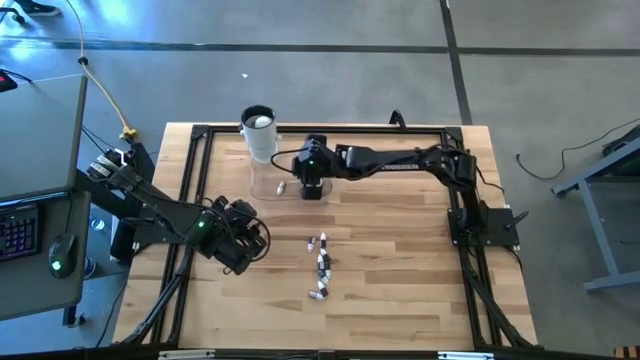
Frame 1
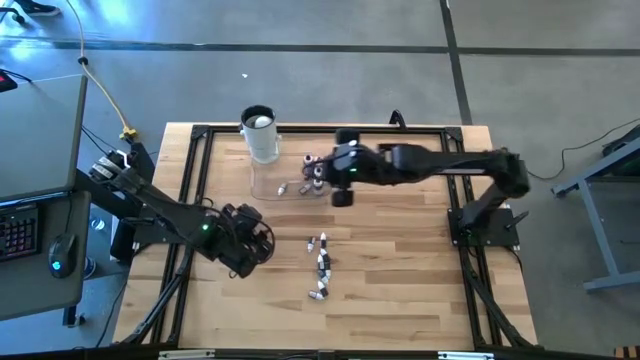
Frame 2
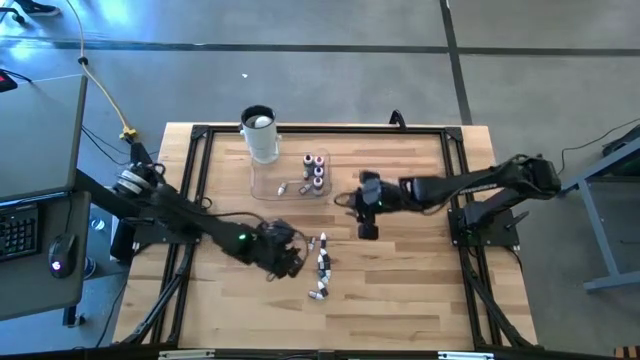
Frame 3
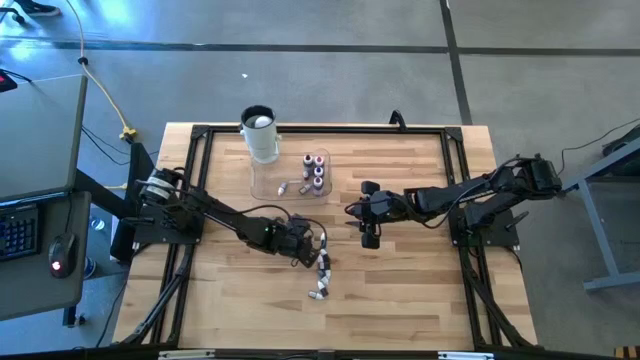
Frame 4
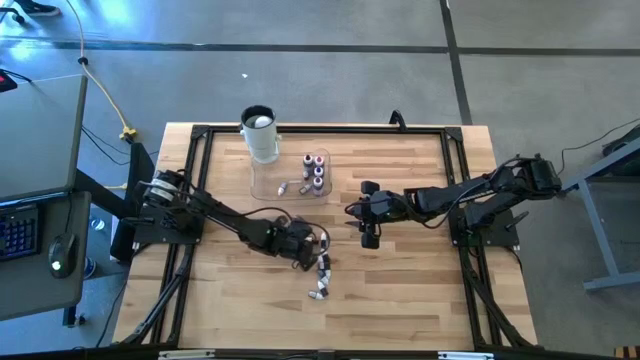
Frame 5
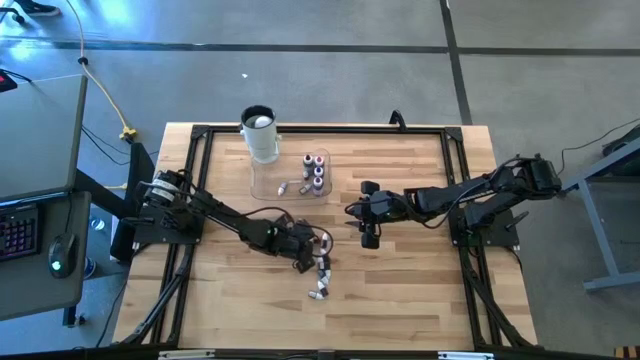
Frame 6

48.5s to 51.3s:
Task: Pick & Place food coloring
Put the small red food coloring bottle into the transparent bin

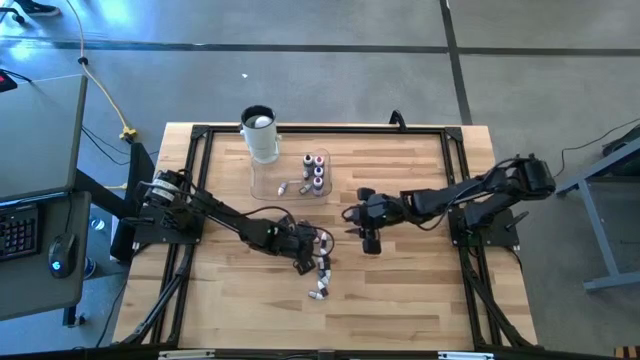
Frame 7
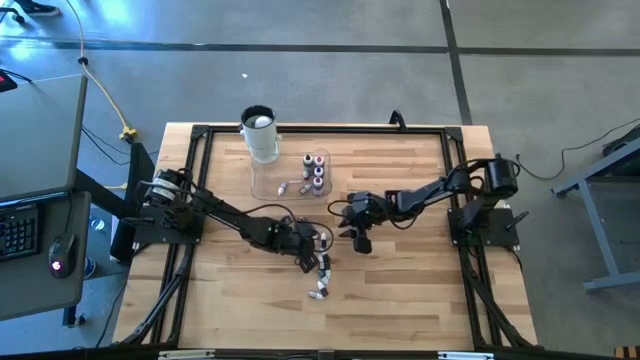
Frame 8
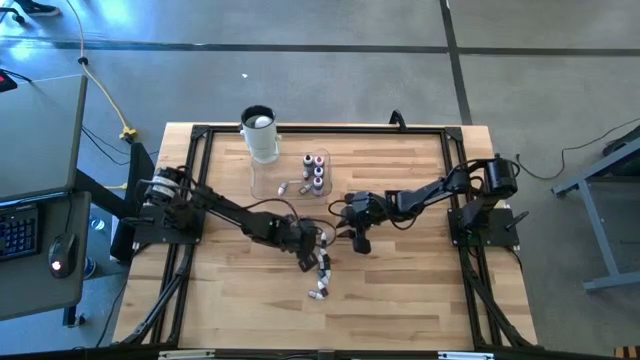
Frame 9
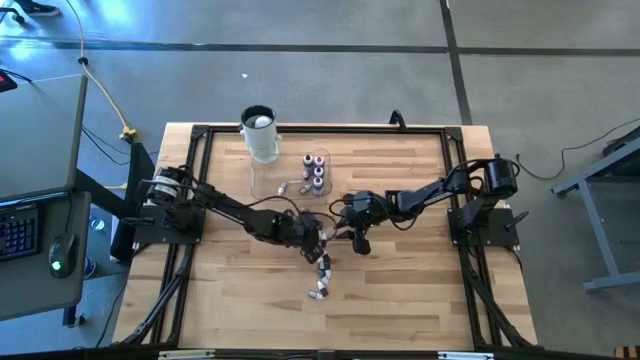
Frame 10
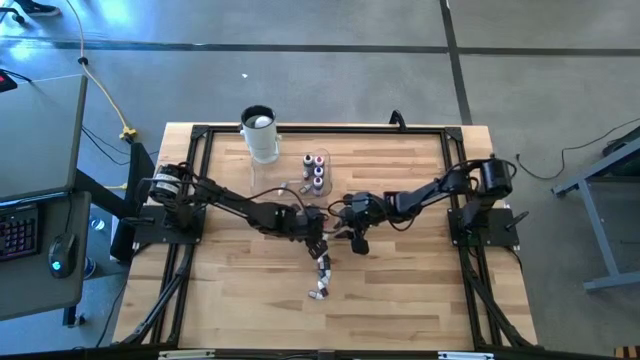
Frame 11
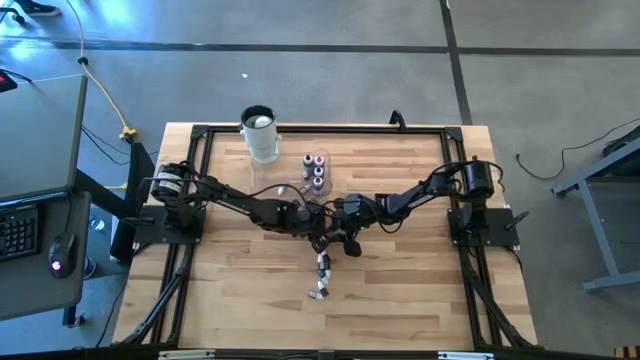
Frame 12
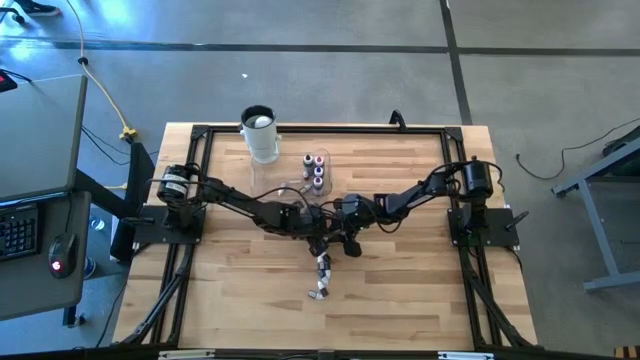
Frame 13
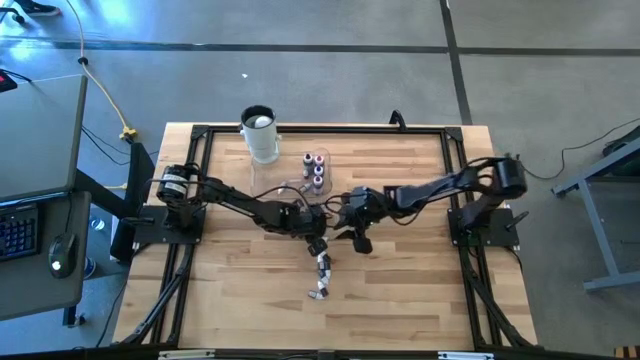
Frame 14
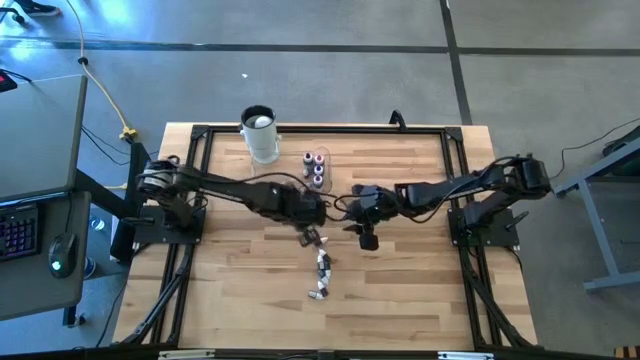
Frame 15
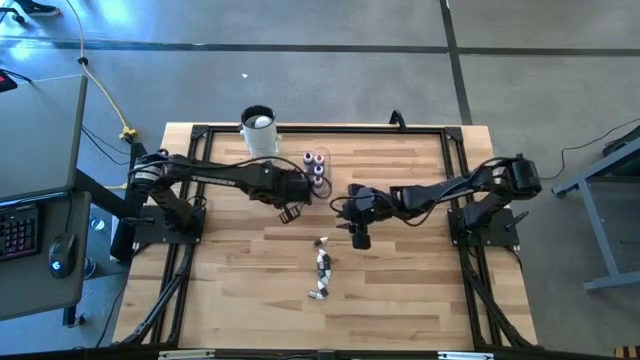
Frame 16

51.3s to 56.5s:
Put the small red food coloring bottle into the transparent bin

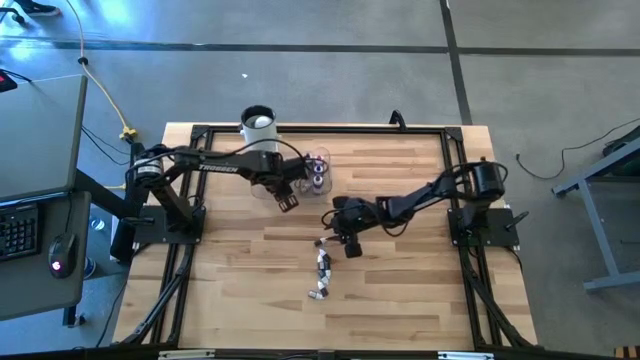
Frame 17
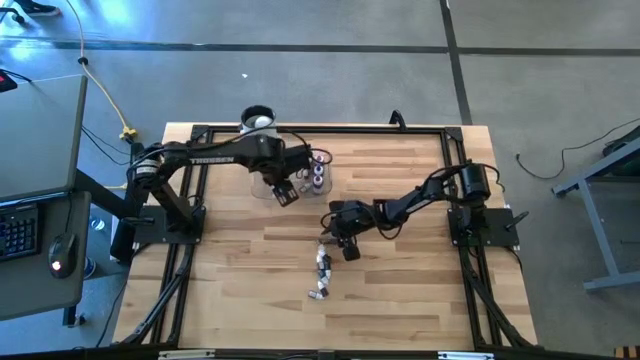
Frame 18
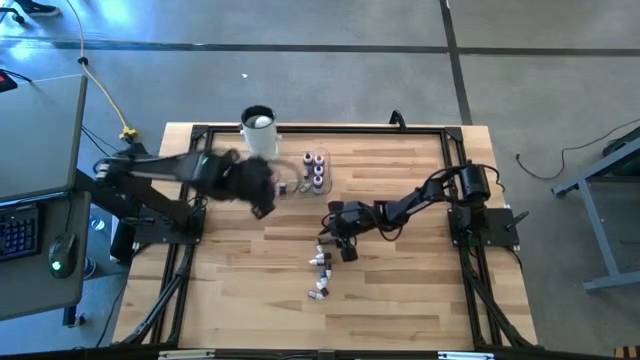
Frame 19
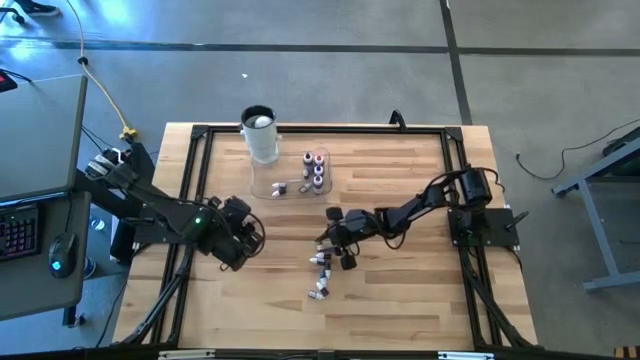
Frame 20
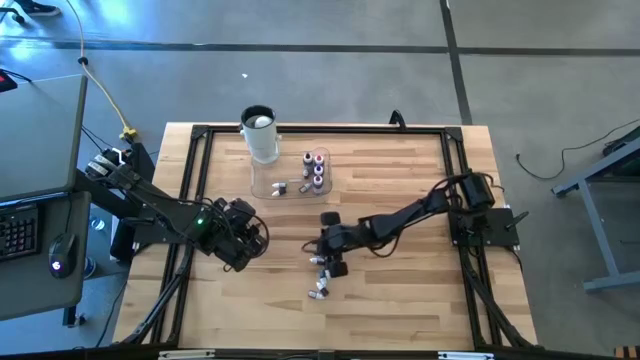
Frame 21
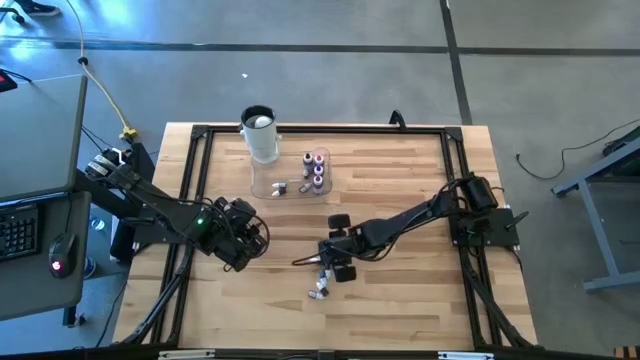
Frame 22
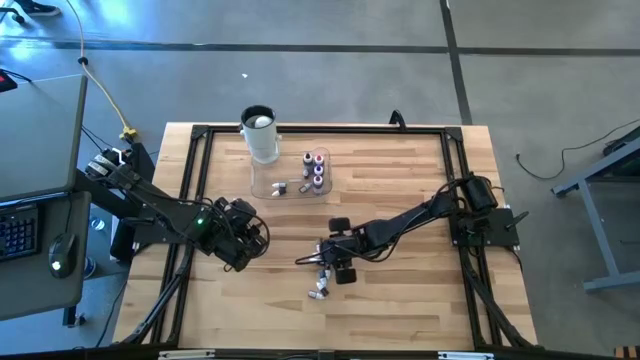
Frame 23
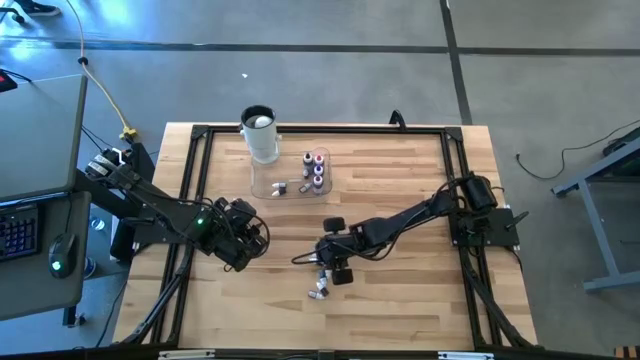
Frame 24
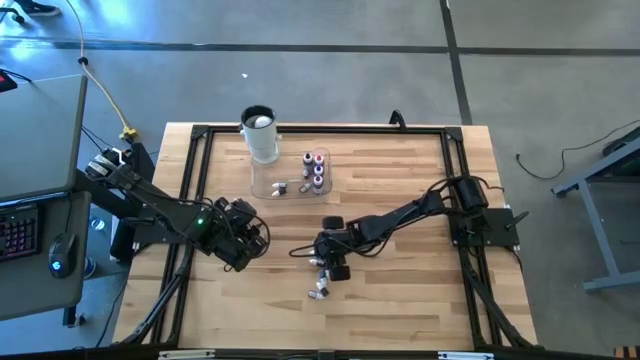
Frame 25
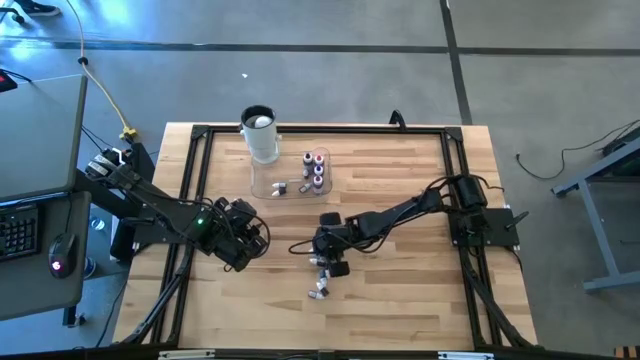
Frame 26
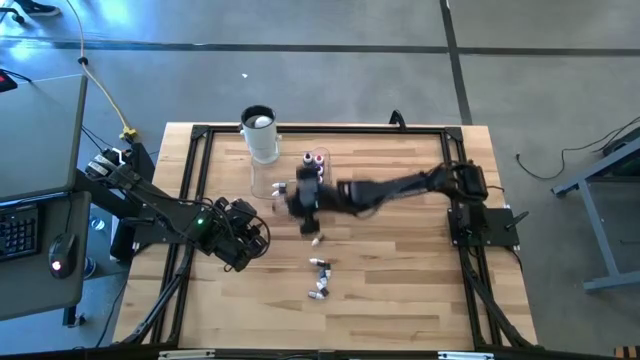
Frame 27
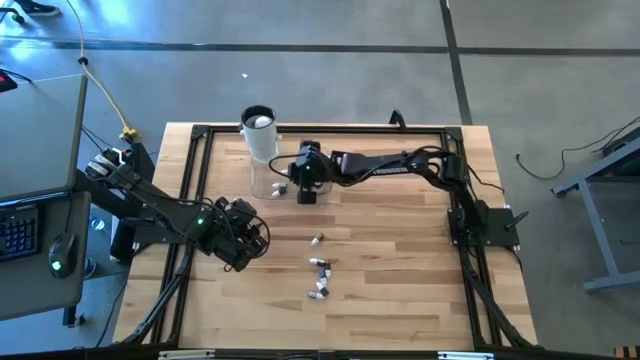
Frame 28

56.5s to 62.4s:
Put the small black food coloring bottle into the transparent bin

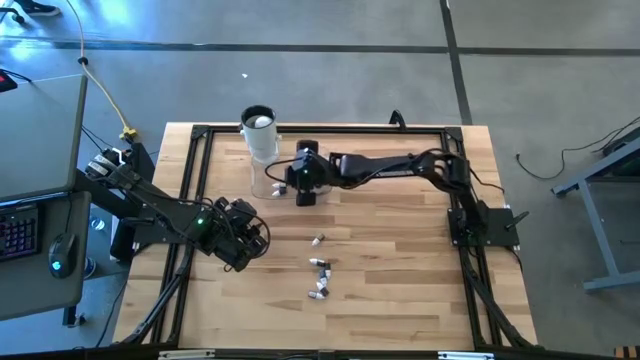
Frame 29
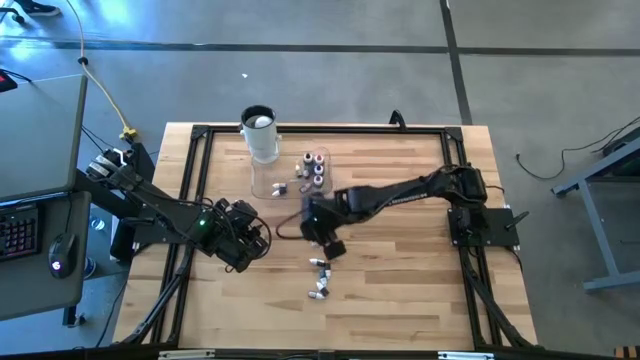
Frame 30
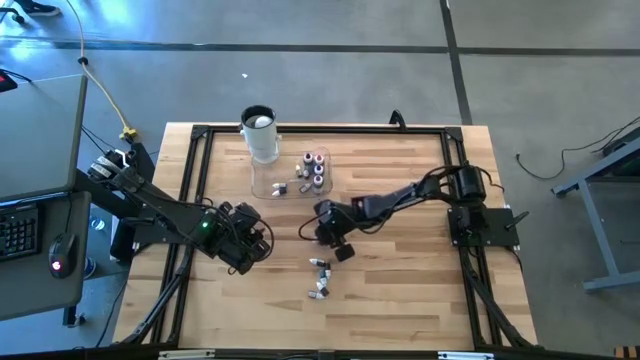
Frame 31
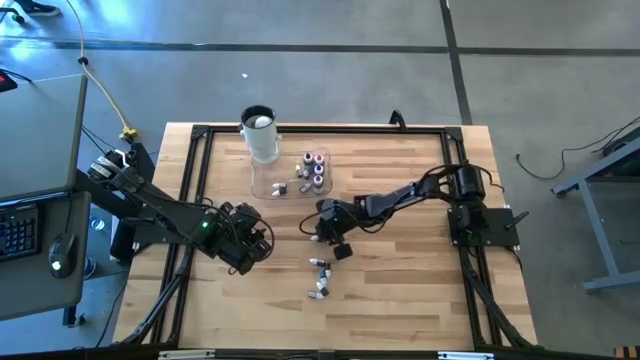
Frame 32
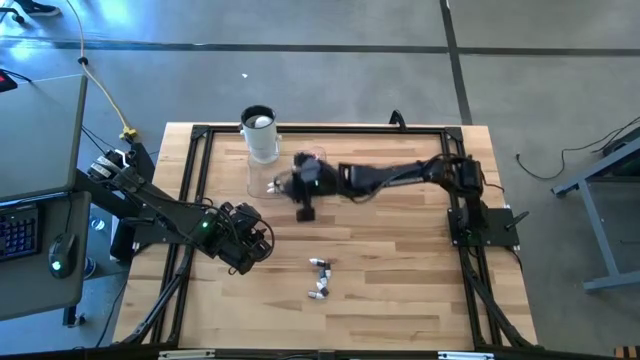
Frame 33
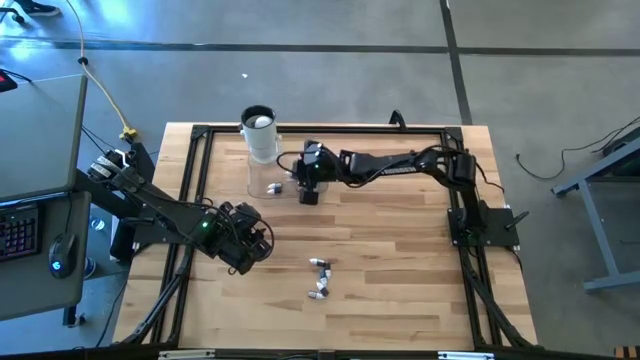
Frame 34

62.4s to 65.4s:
Put the small green food coloring bottle into the transparent bin

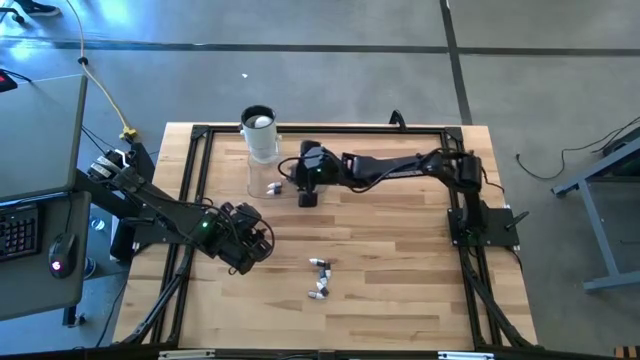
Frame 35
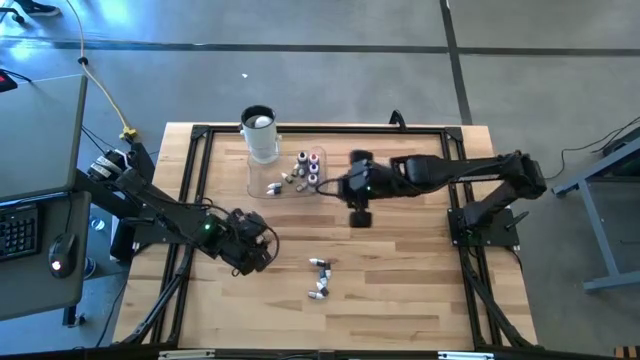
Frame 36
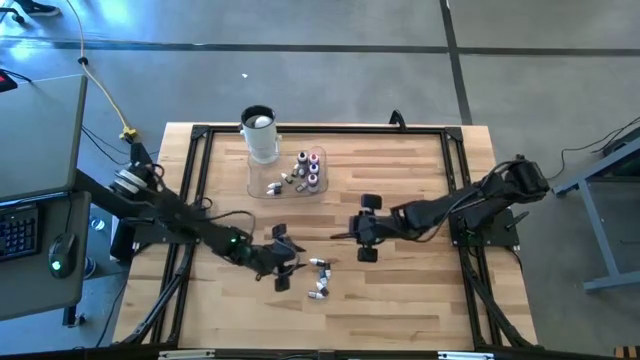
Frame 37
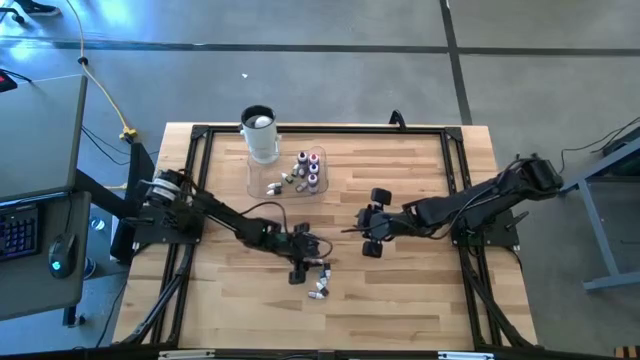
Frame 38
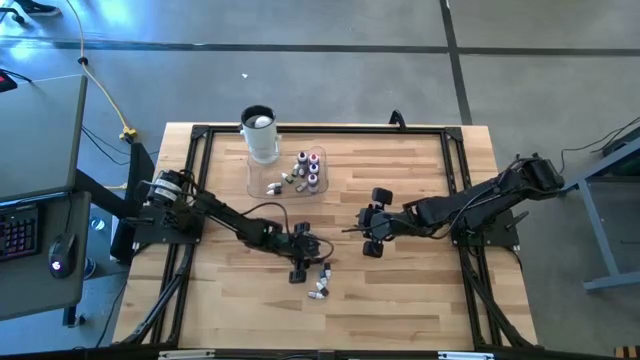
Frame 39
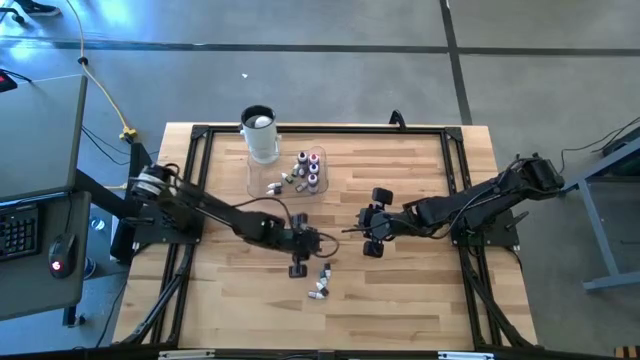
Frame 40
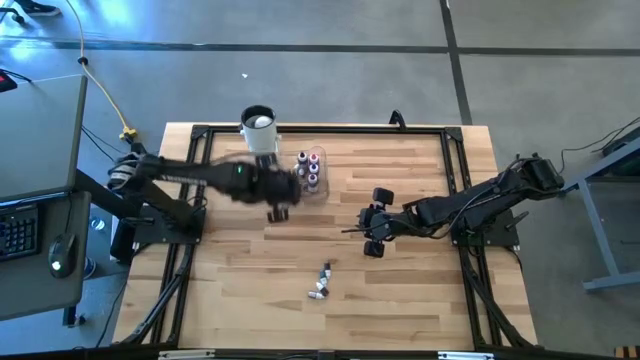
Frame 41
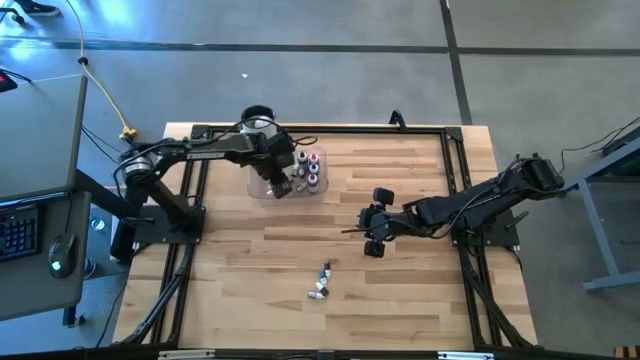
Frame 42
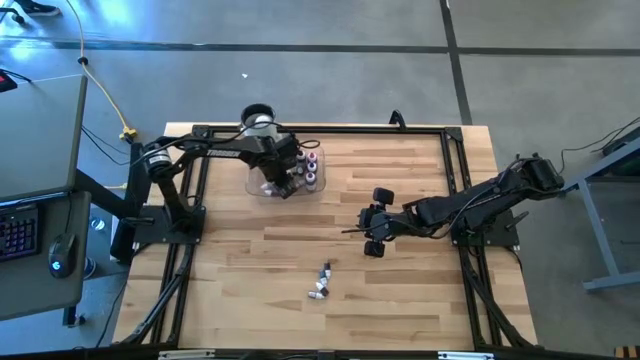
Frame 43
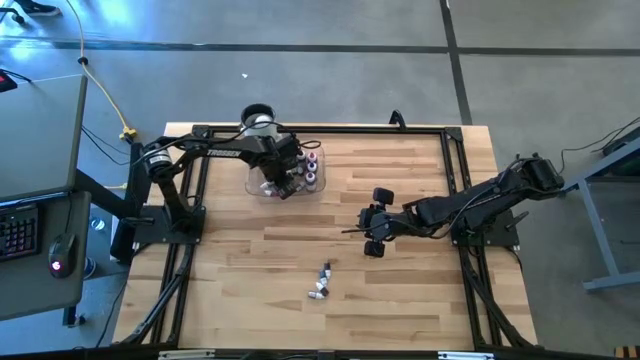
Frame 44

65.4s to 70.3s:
Put the small black food coloring bottle into the transparent bin
